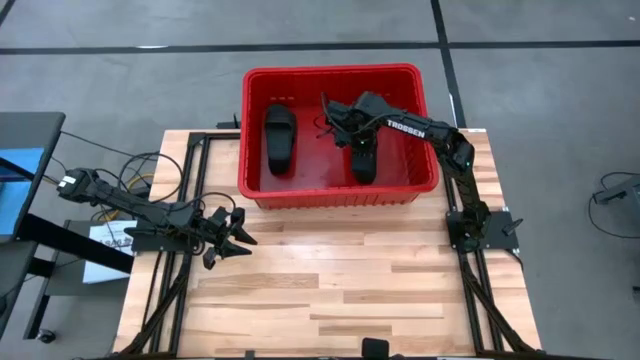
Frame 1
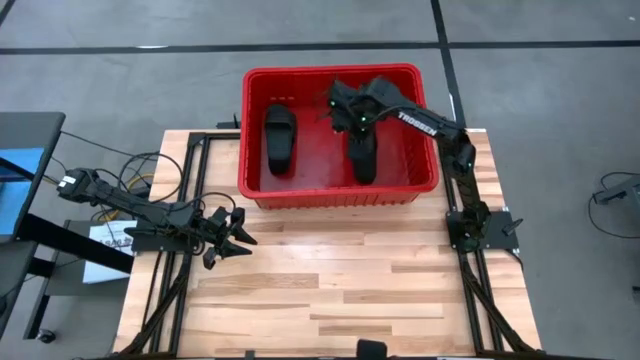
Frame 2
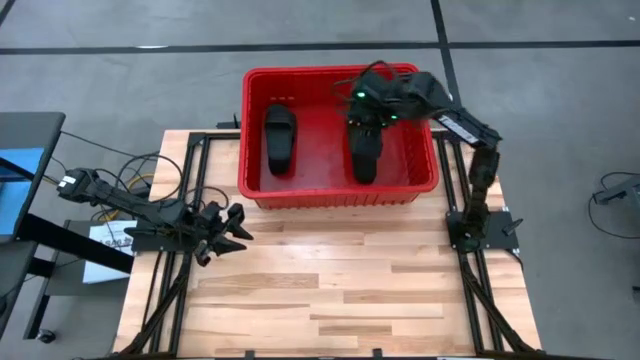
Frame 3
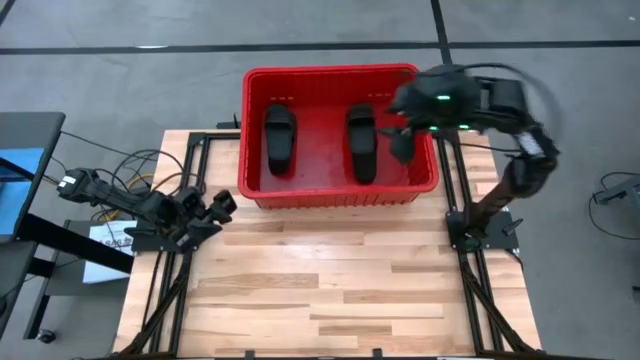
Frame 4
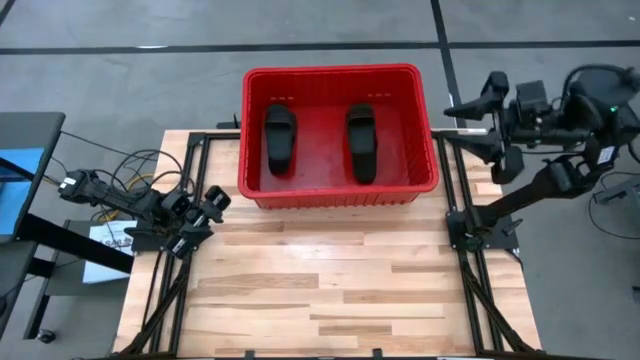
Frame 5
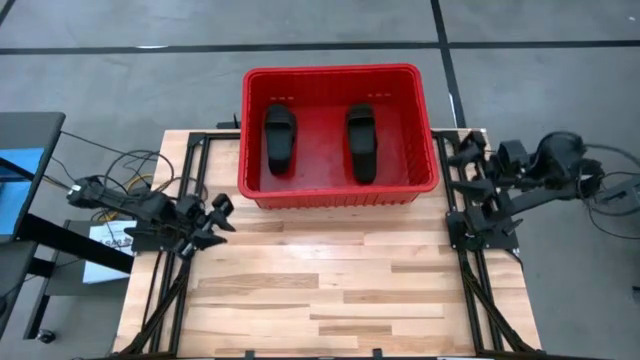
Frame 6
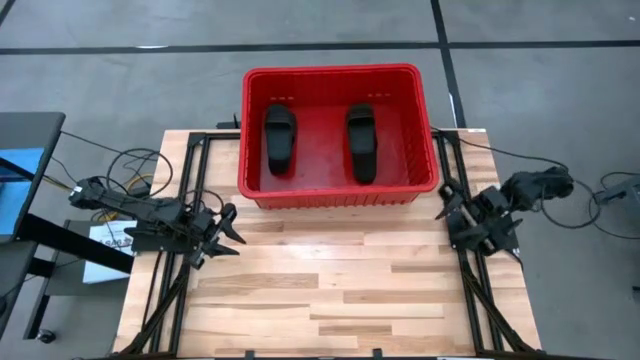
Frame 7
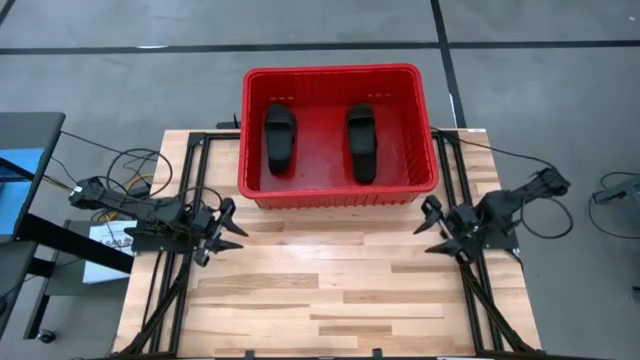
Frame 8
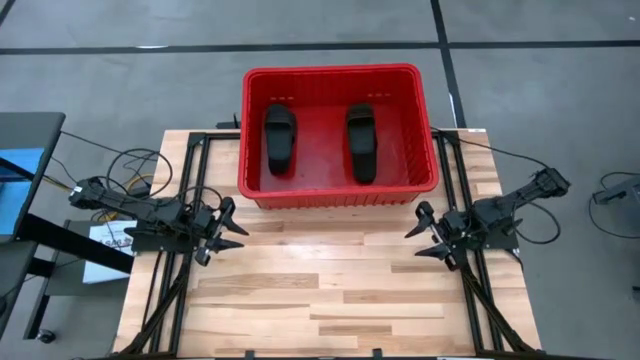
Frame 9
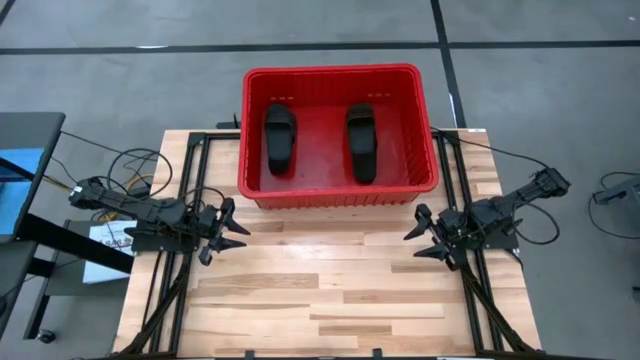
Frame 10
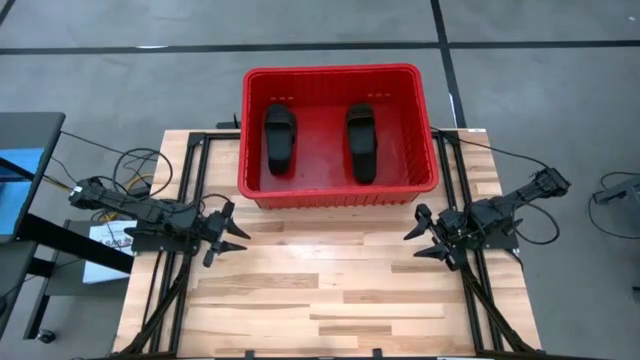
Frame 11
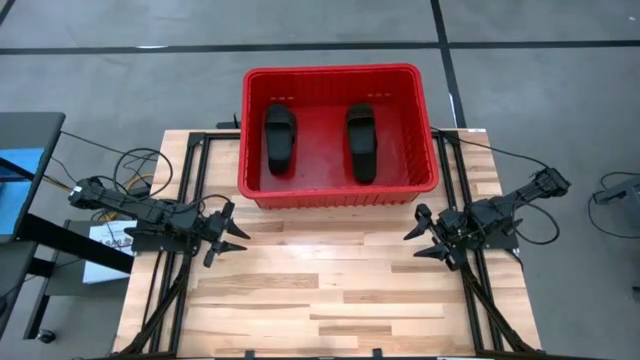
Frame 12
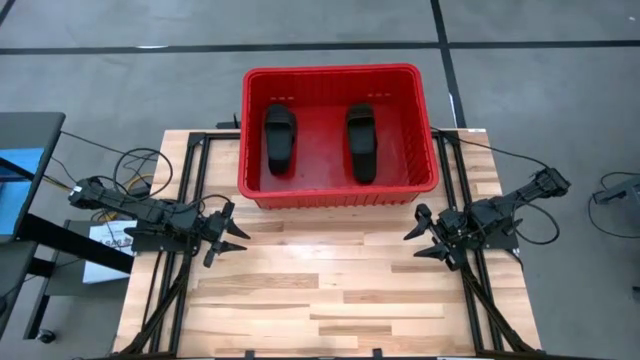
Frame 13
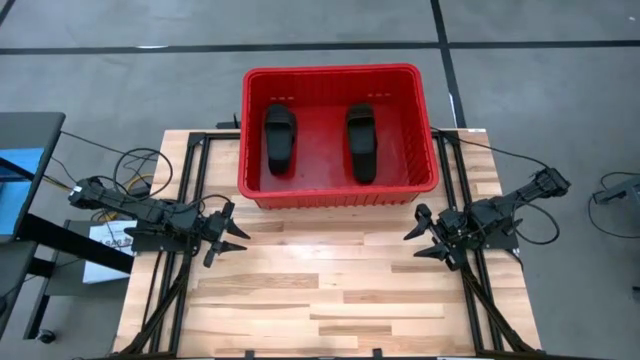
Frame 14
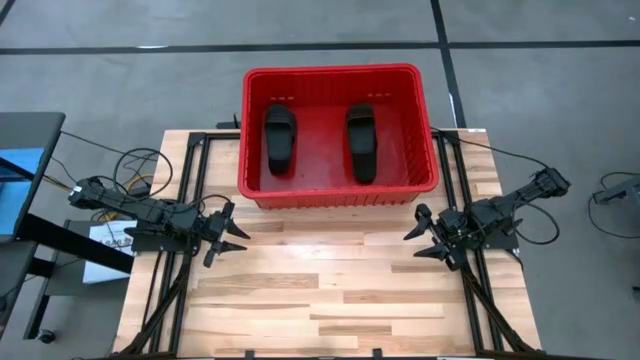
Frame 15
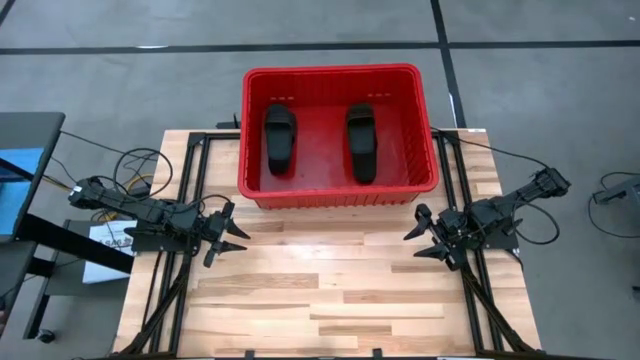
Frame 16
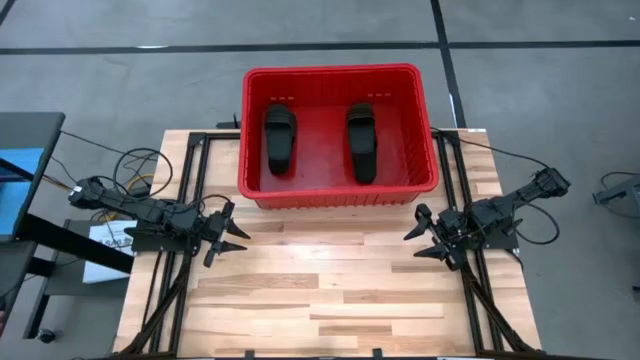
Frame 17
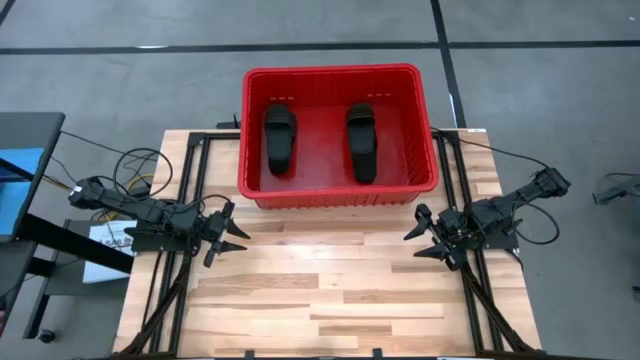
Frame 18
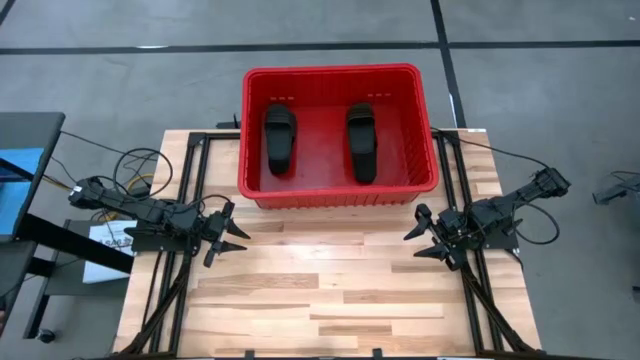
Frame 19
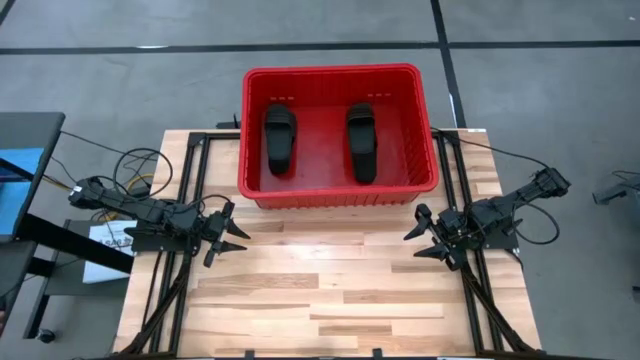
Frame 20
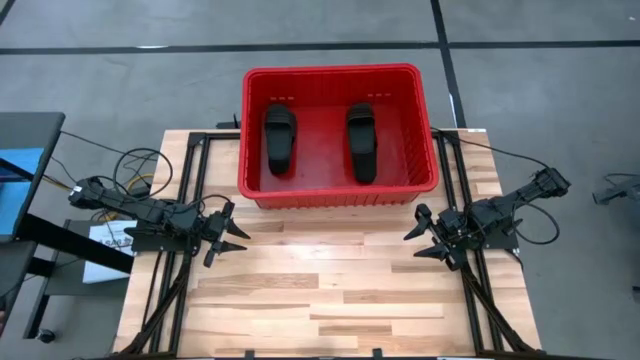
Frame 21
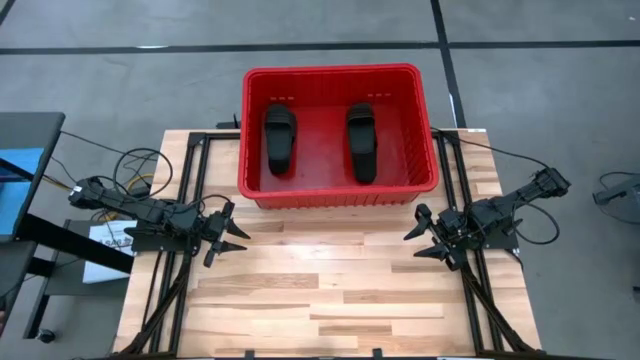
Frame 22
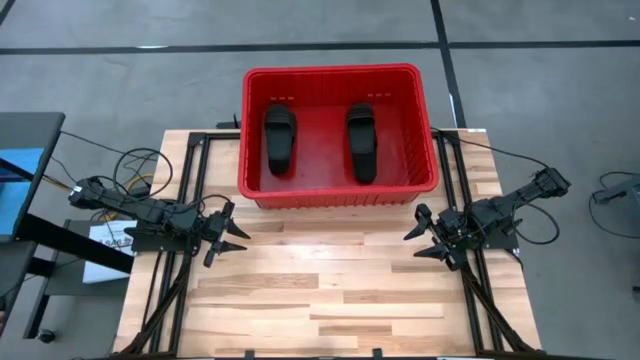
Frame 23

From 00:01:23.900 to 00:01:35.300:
Task: Pick and place slides into bin
Return to Home Position

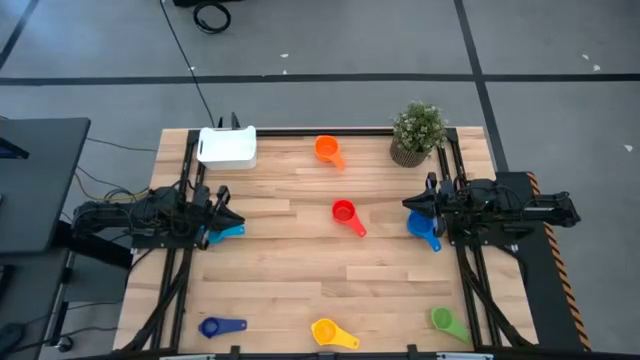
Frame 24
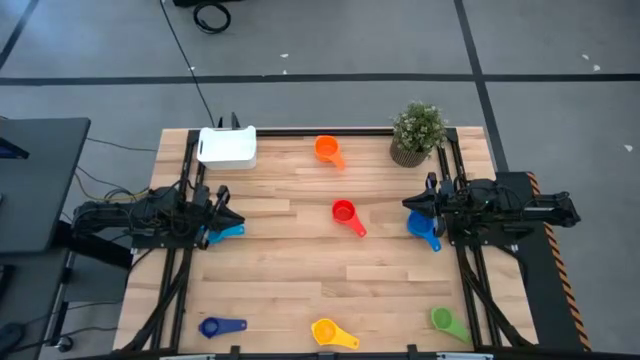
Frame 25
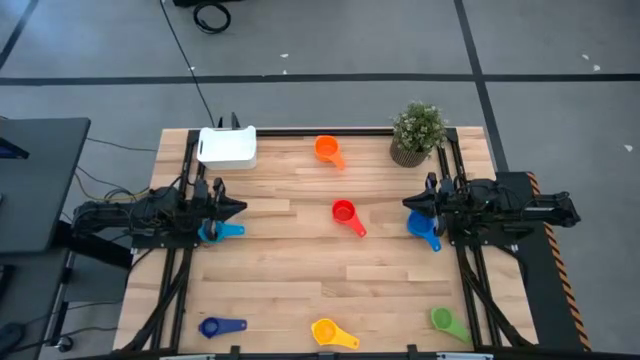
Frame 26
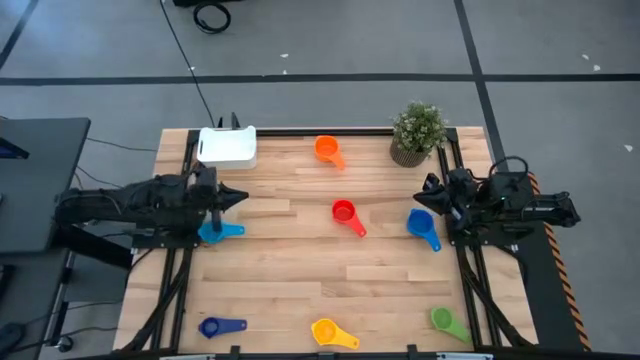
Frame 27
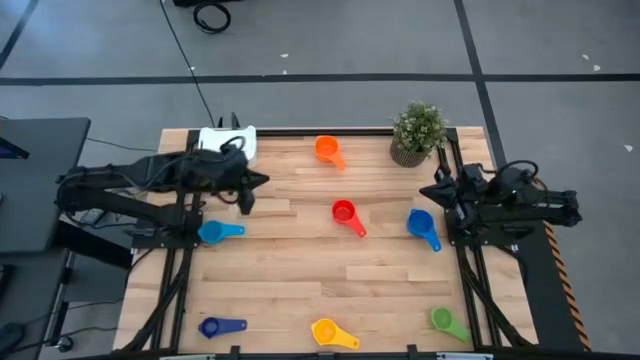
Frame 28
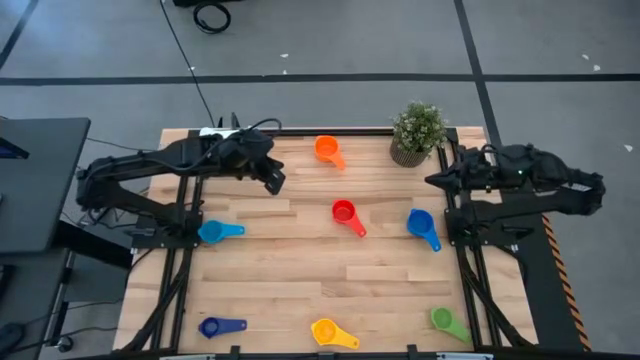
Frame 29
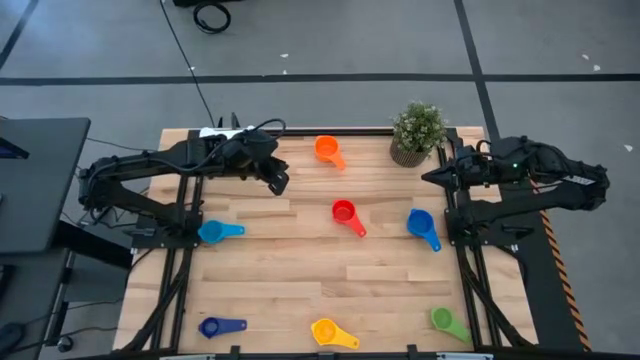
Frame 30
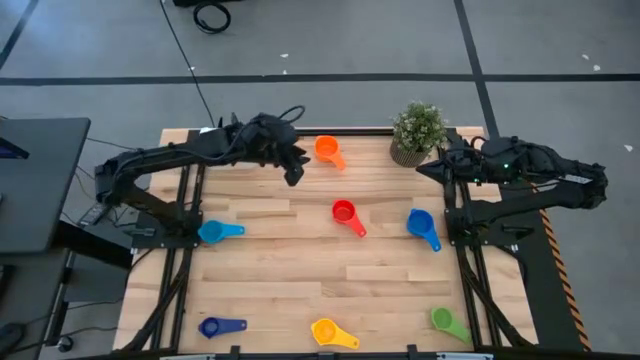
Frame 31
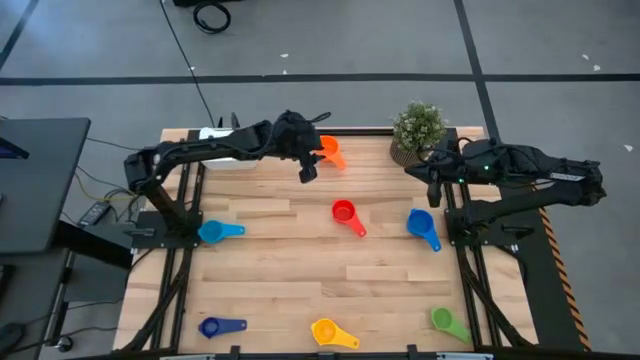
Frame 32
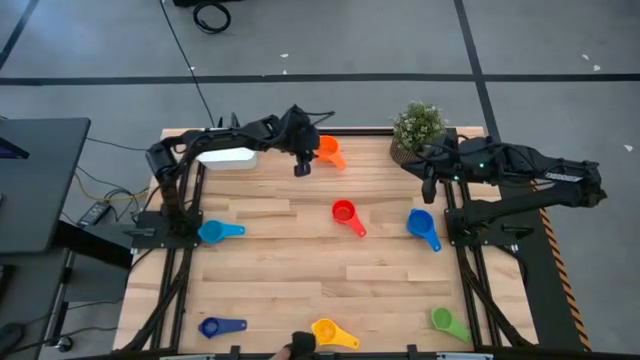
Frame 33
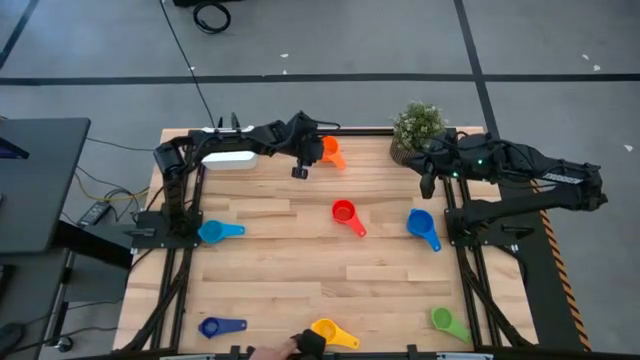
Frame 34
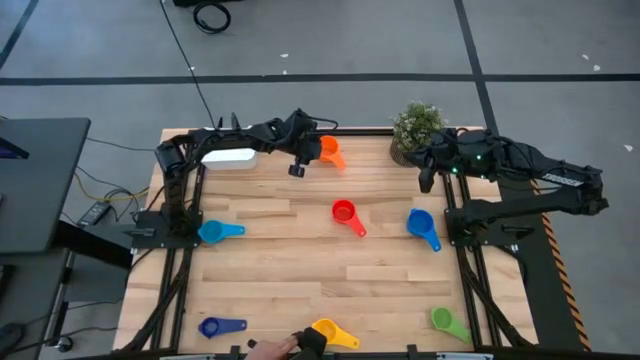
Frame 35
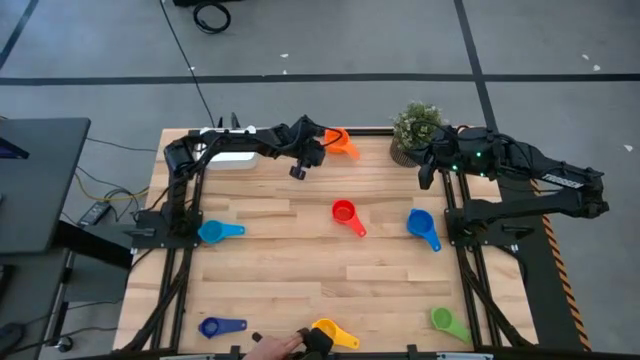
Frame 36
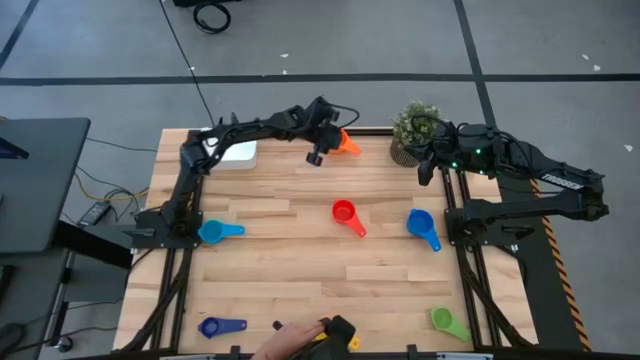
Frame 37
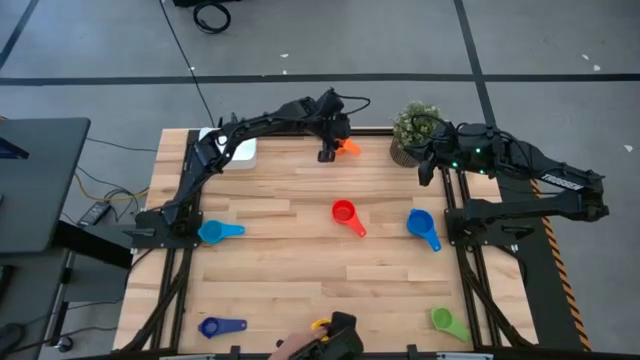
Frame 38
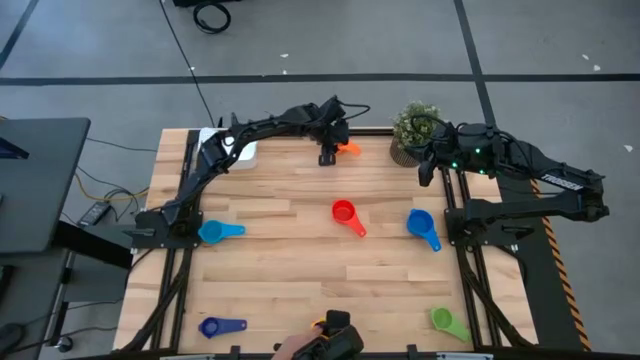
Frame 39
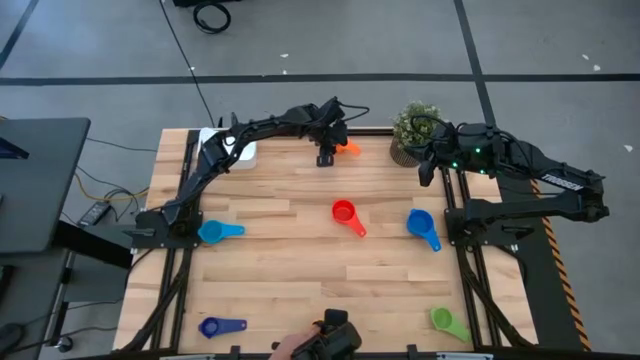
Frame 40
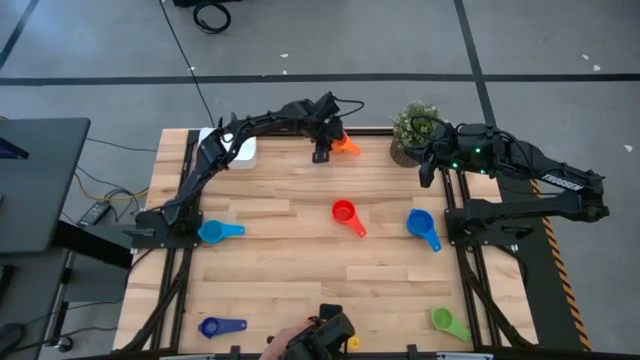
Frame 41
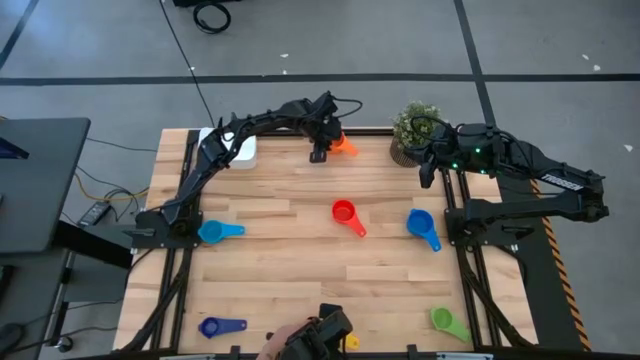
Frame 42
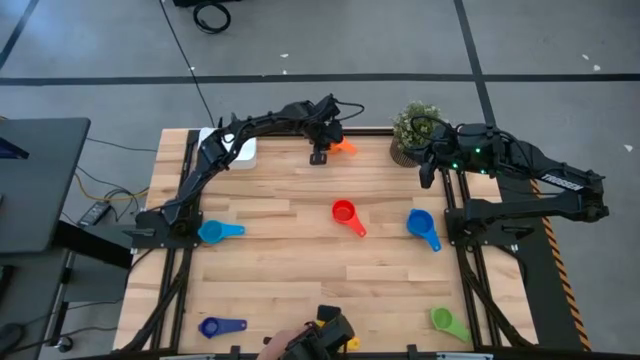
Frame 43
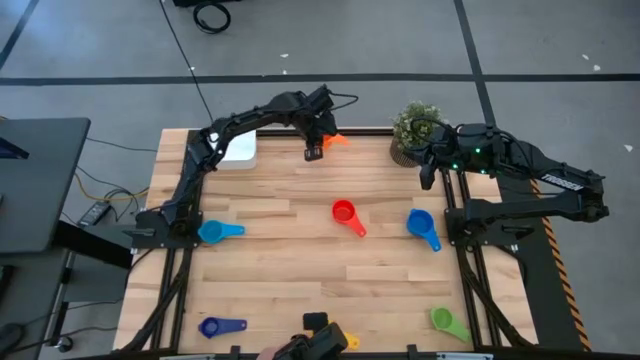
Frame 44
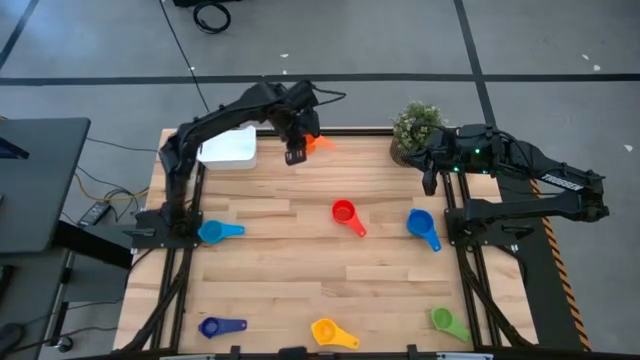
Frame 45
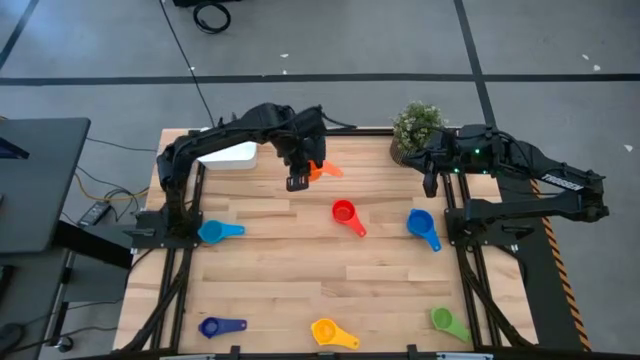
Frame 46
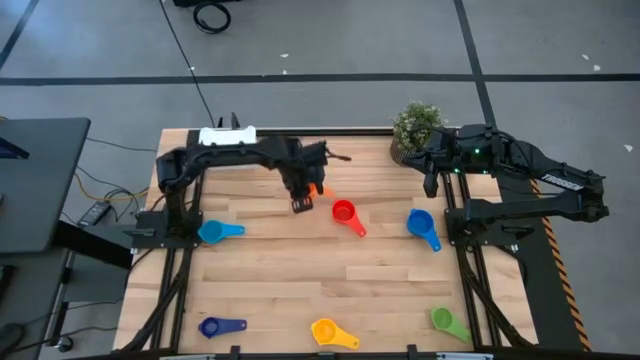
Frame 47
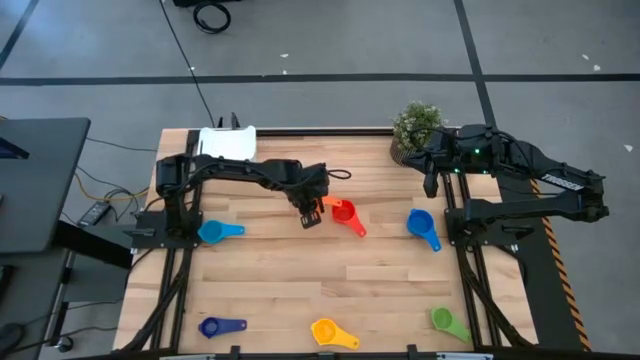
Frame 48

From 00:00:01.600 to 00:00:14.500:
Task: Nest measuring cups in basket
Prepare the orange measuring cup
